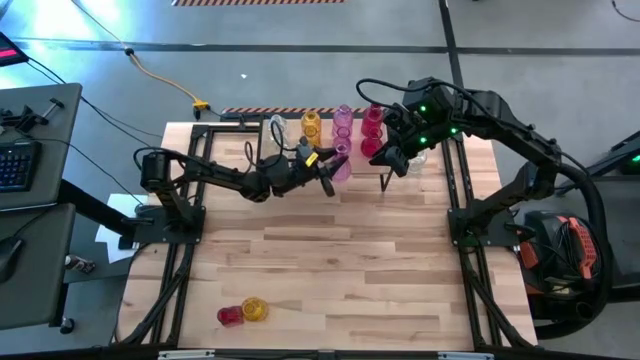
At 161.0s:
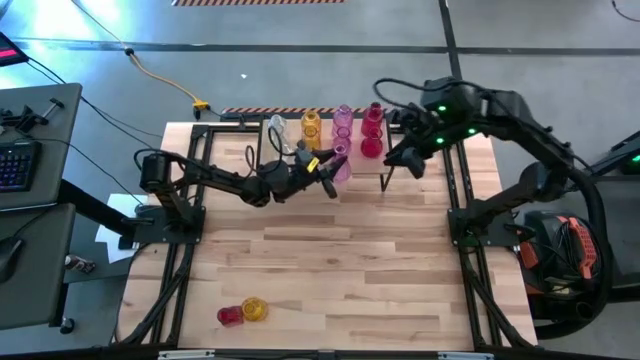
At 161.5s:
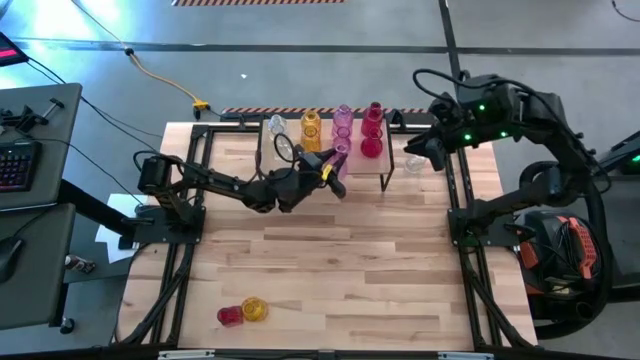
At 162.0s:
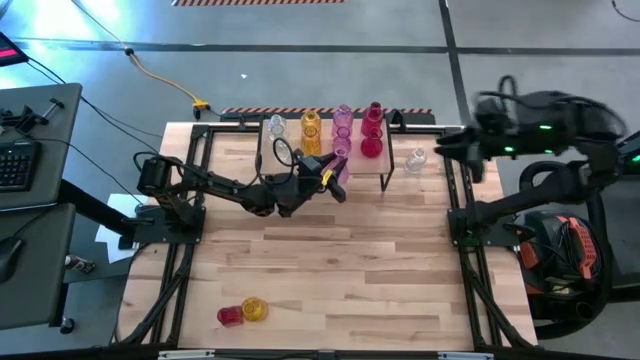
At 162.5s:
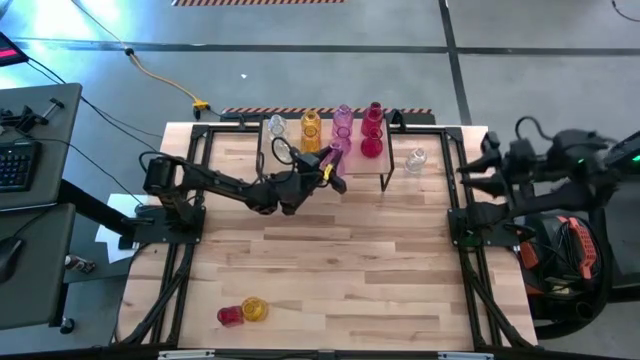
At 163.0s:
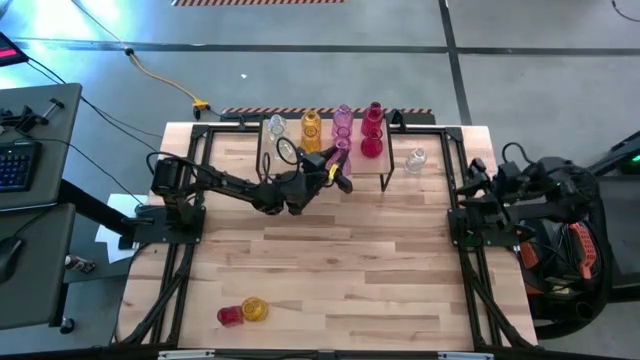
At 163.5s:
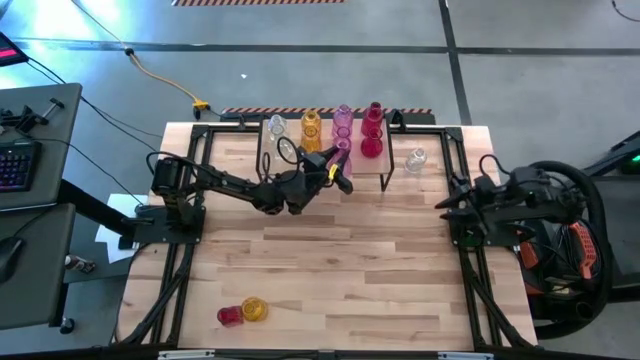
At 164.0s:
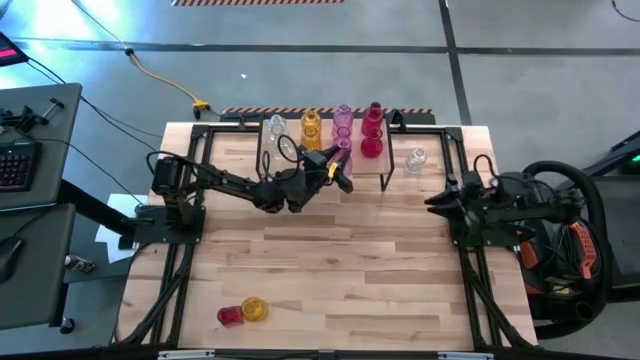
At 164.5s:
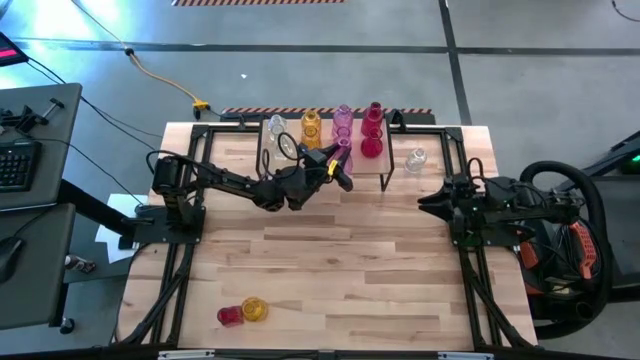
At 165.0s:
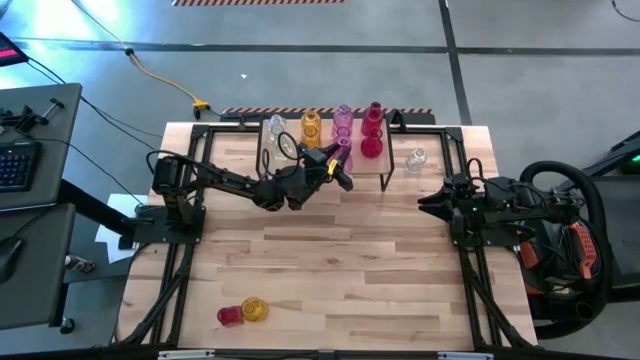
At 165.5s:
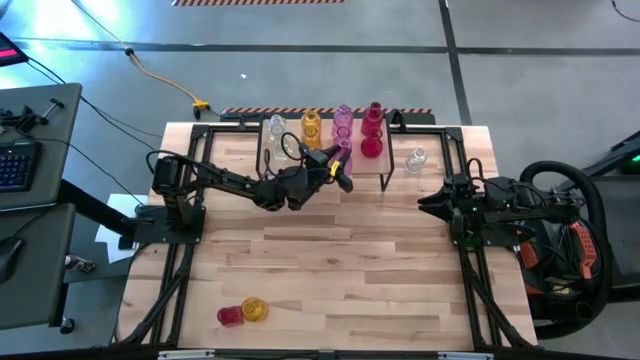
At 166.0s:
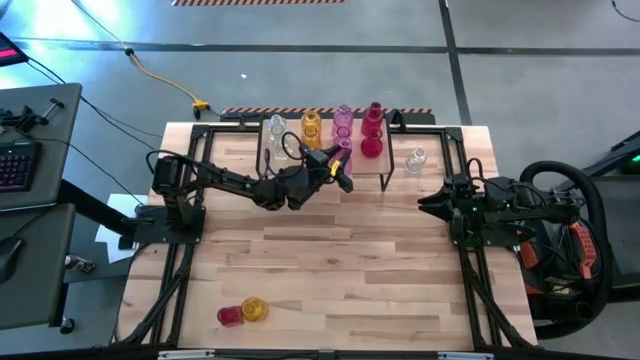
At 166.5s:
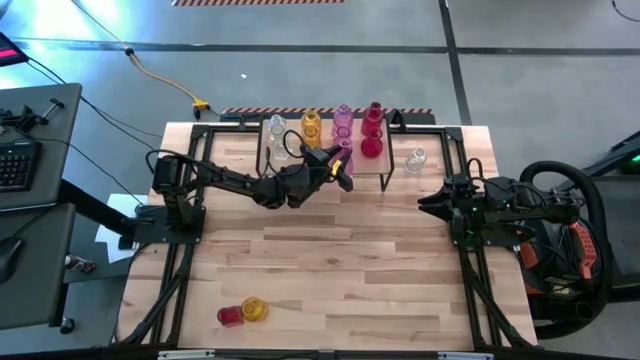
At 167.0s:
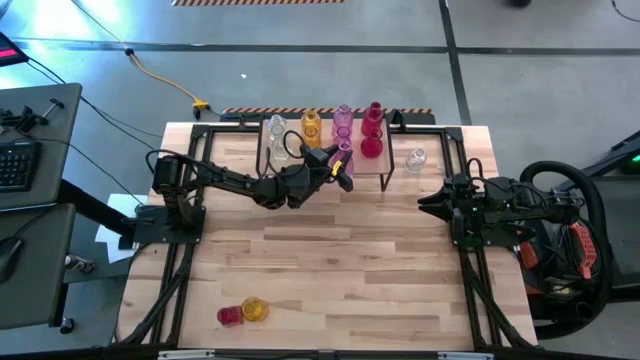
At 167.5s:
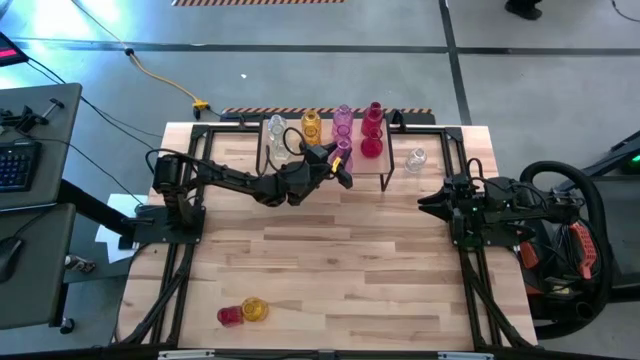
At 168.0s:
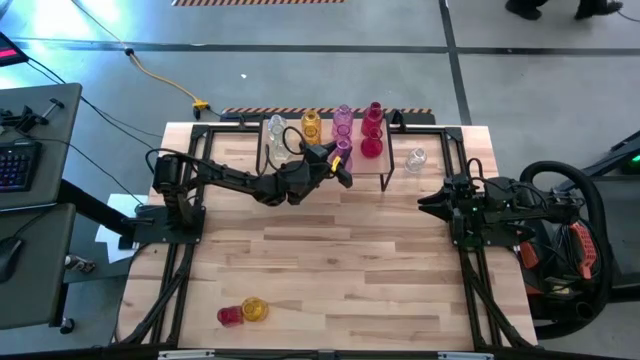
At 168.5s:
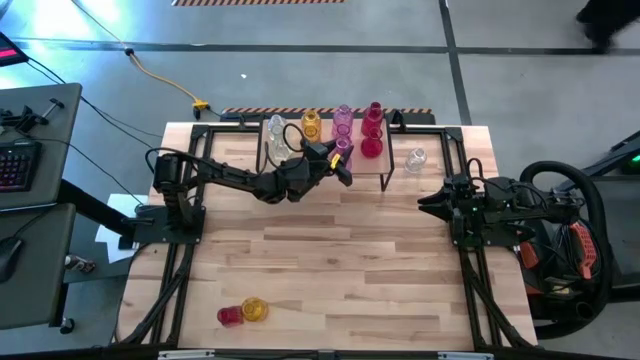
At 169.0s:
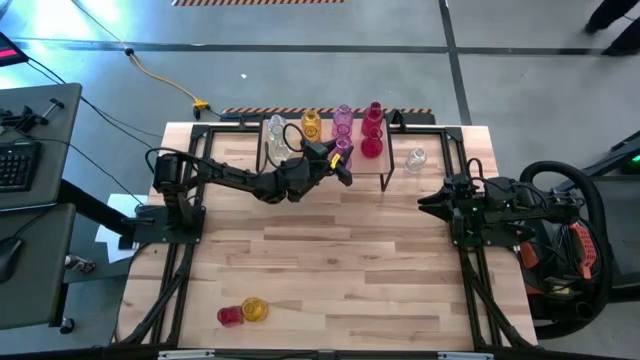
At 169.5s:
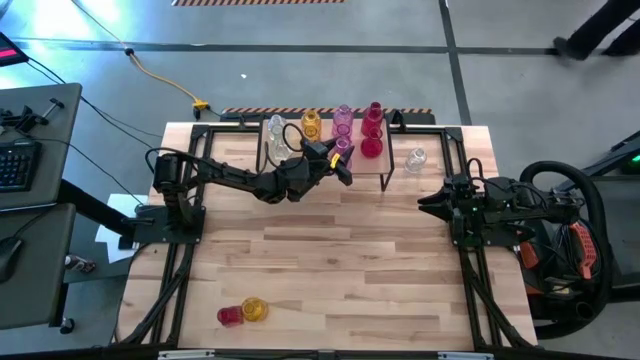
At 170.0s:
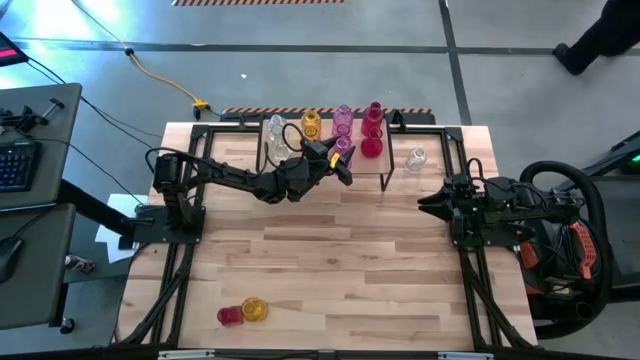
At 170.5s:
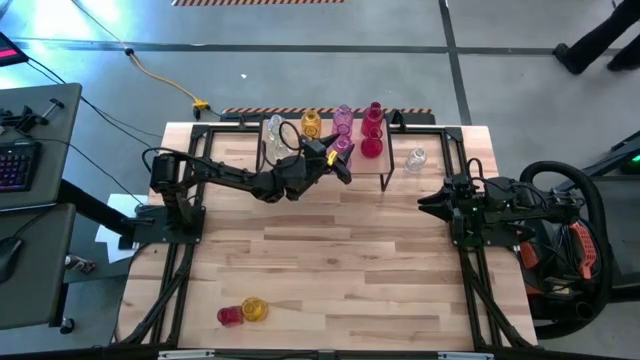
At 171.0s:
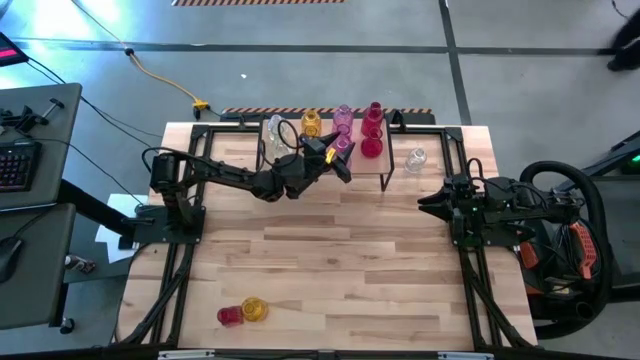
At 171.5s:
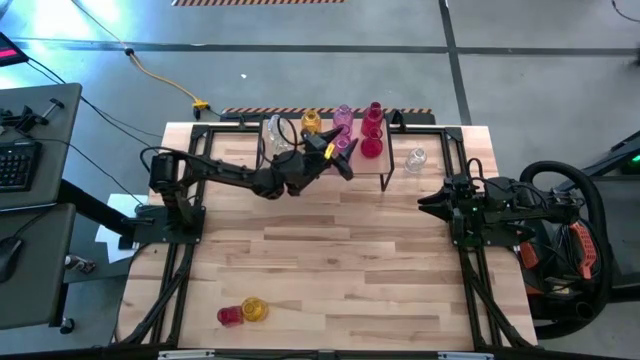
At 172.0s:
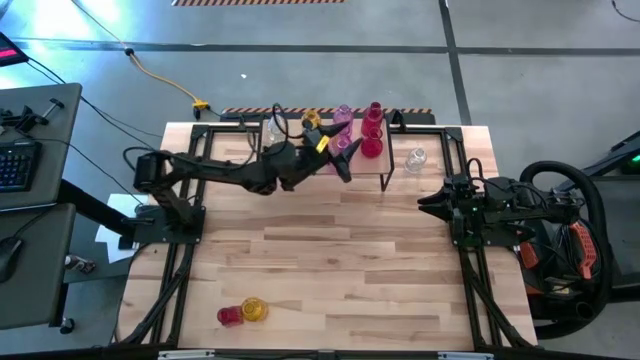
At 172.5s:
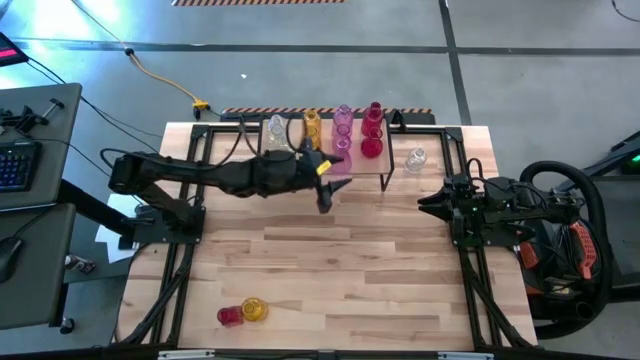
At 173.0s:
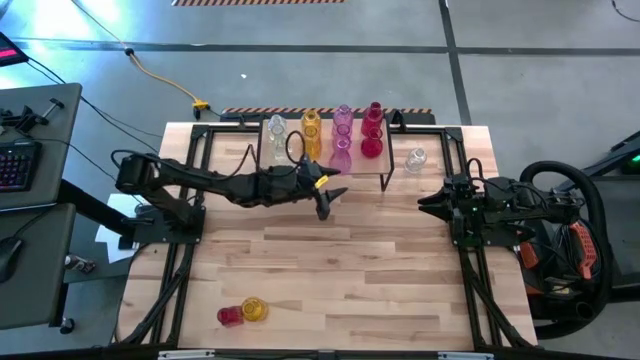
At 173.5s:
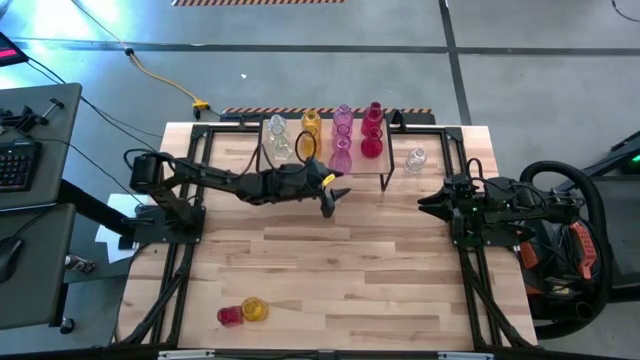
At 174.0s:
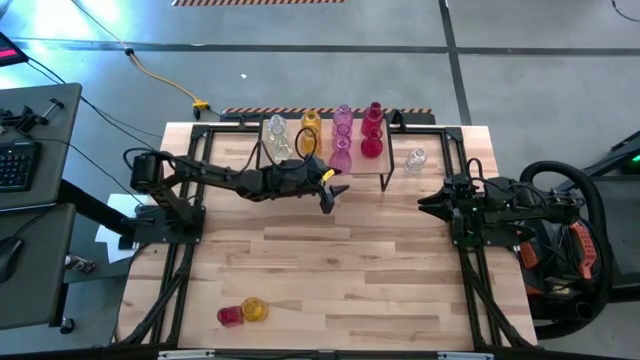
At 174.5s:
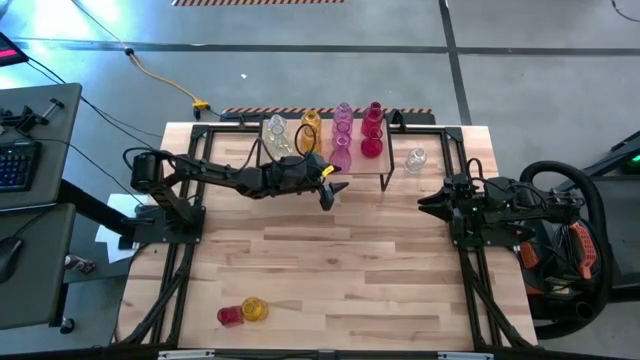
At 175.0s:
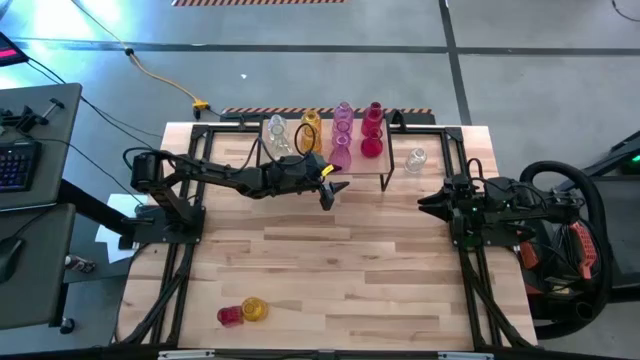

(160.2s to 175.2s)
Task: sort vases onto shelf
Put the violet vase aligned with the other violet vases on the shelf

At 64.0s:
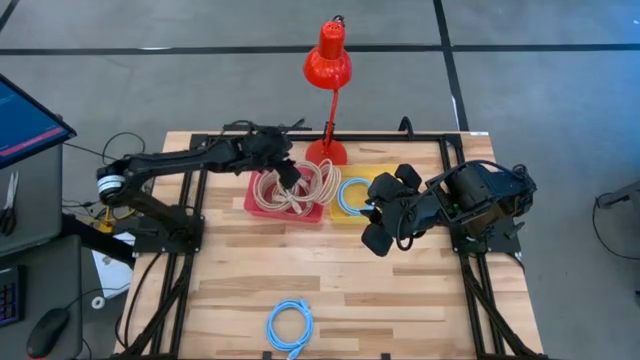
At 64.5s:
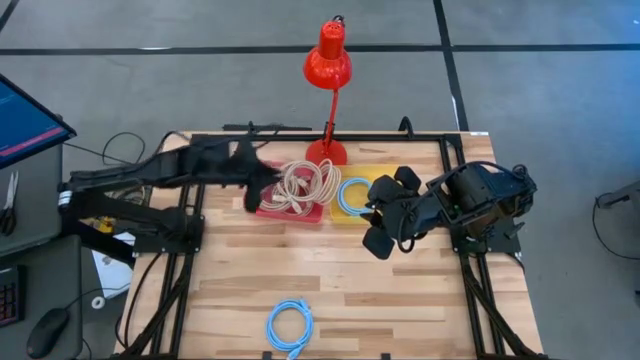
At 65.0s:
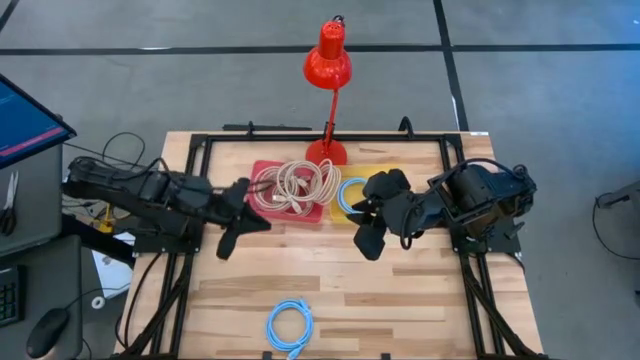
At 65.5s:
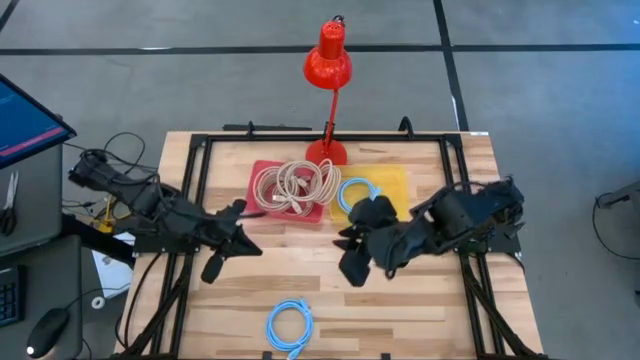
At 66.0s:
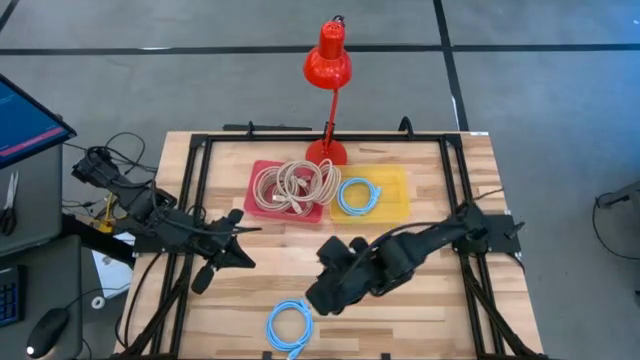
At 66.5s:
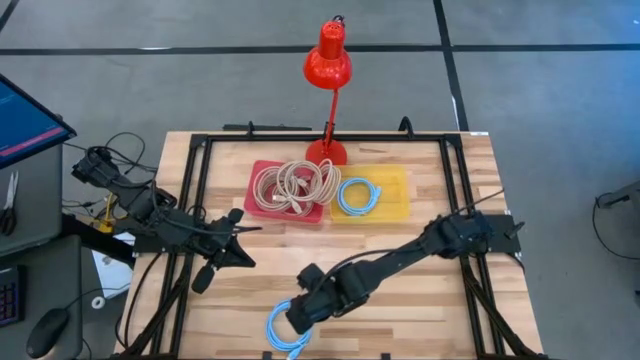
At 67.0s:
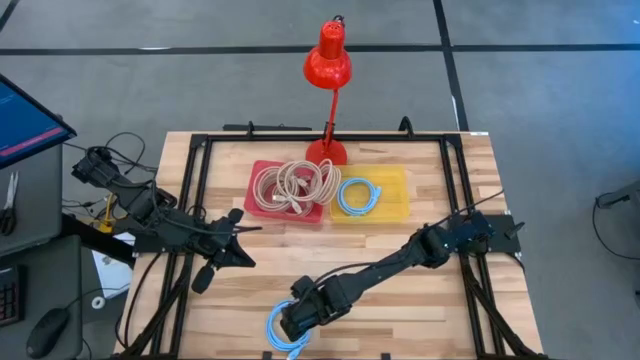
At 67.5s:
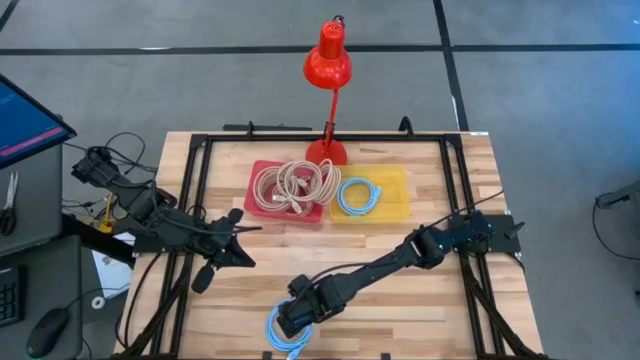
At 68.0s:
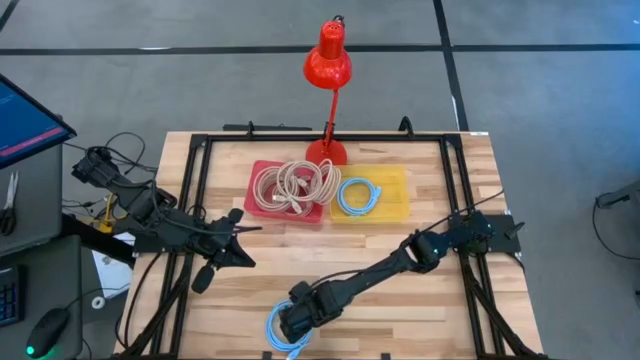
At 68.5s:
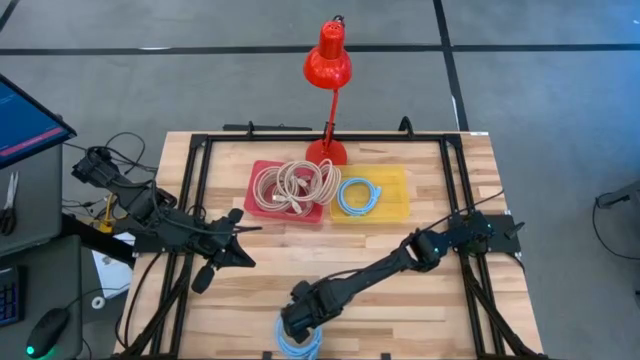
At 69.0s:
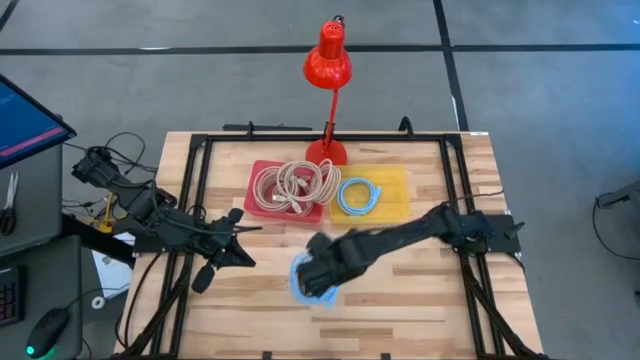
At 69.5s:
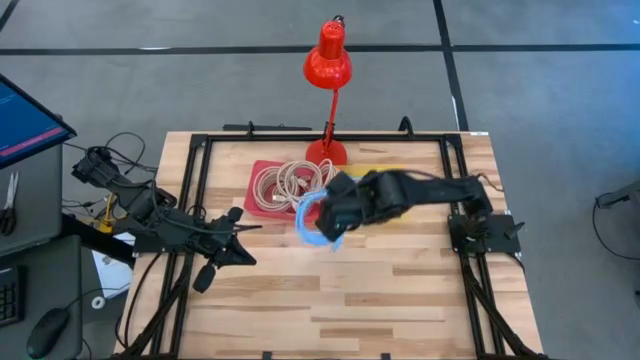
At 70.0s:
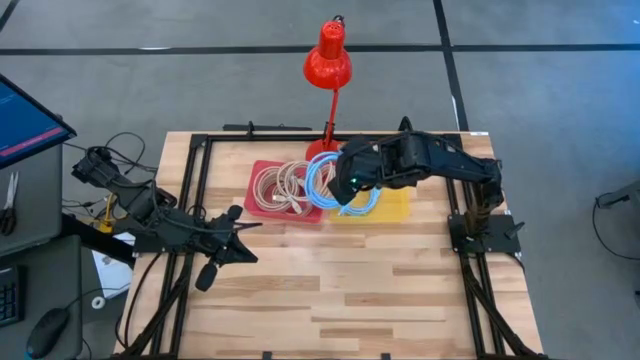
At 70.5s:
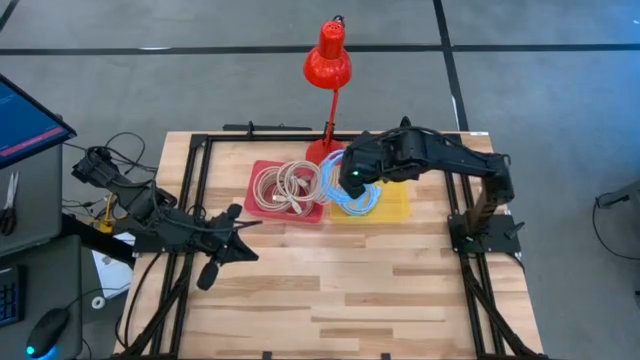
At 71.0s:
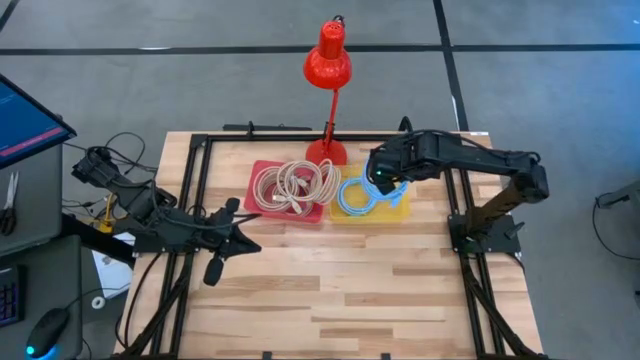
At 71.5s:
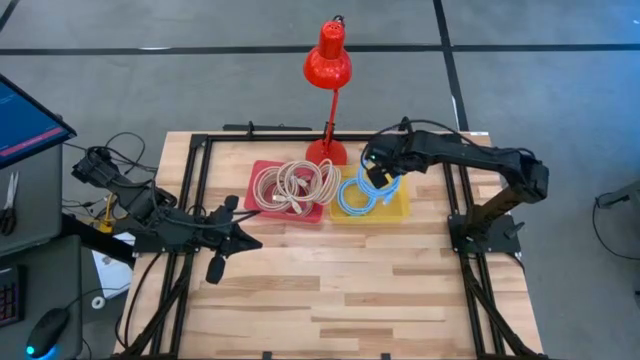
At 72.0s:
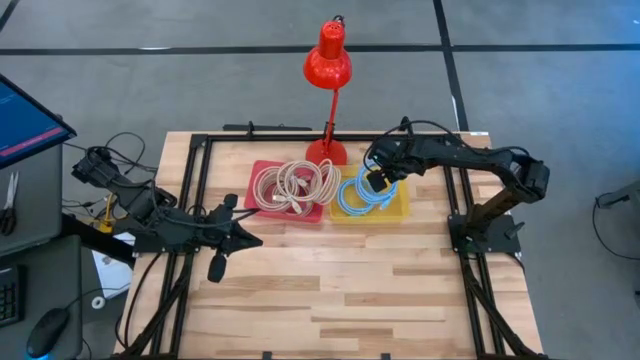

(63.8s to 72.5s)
Task: Sort HDMI cables
Put the blue HDMI cable into the yellow bin
